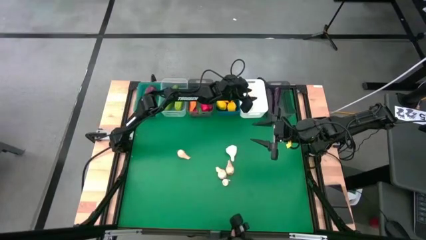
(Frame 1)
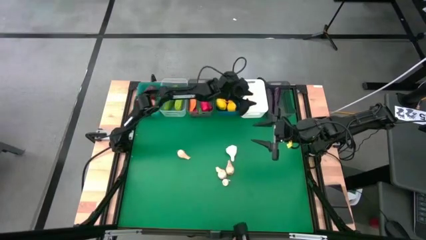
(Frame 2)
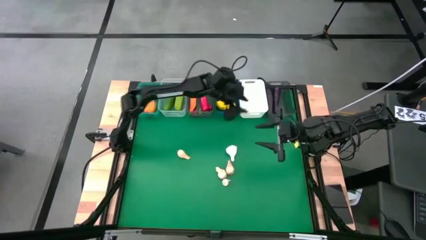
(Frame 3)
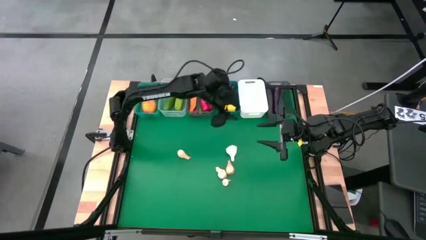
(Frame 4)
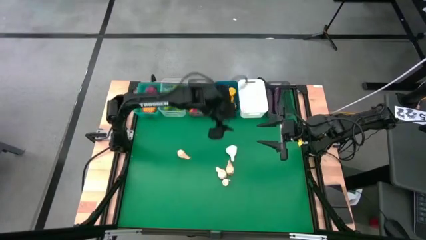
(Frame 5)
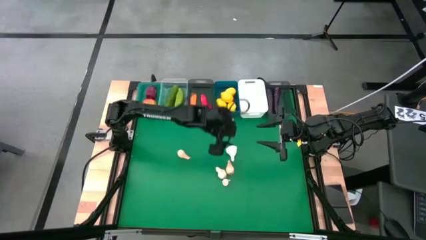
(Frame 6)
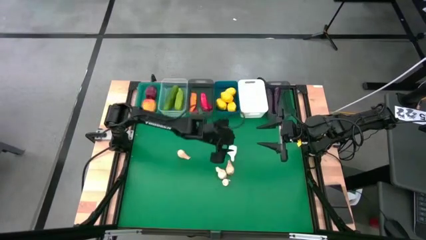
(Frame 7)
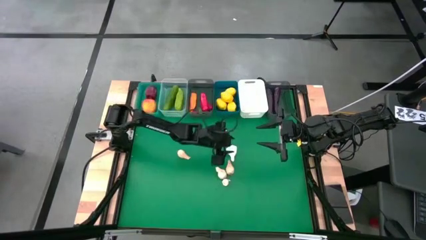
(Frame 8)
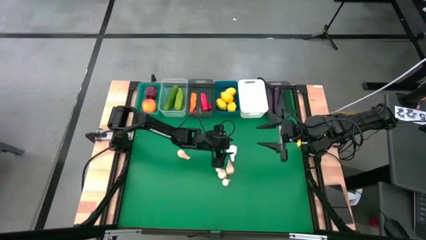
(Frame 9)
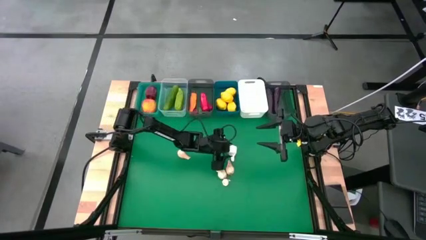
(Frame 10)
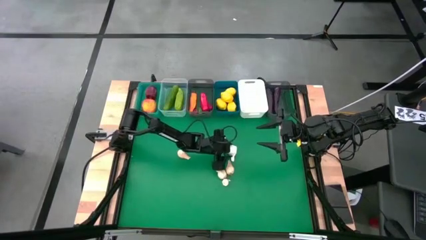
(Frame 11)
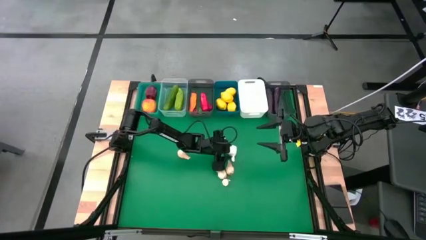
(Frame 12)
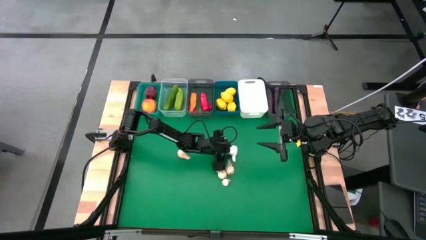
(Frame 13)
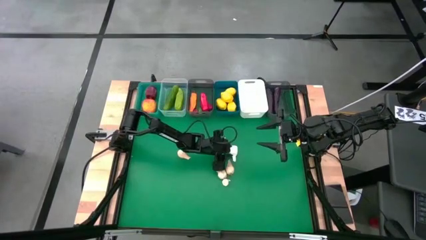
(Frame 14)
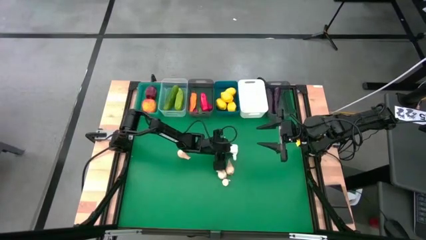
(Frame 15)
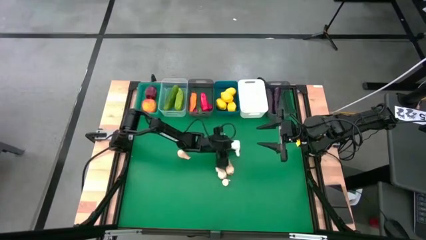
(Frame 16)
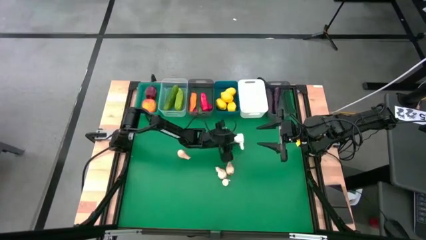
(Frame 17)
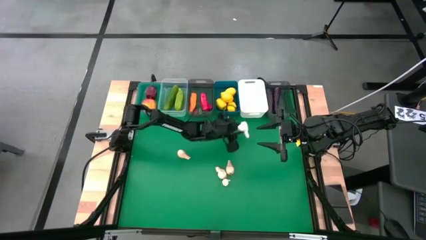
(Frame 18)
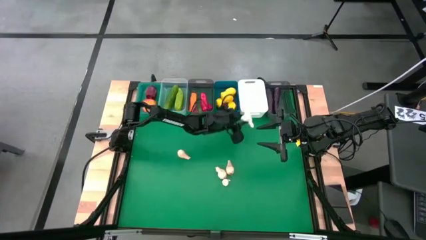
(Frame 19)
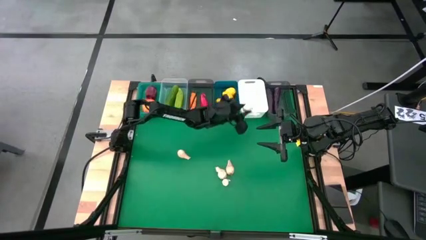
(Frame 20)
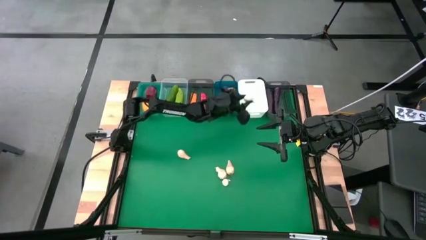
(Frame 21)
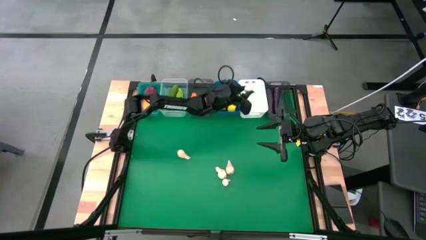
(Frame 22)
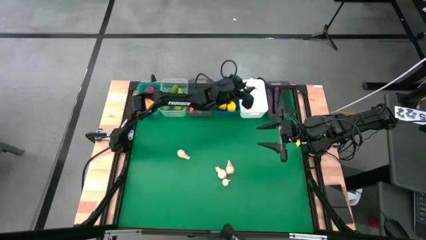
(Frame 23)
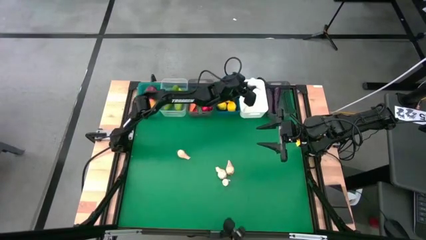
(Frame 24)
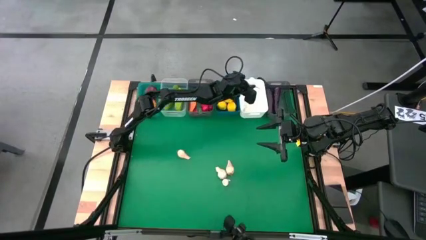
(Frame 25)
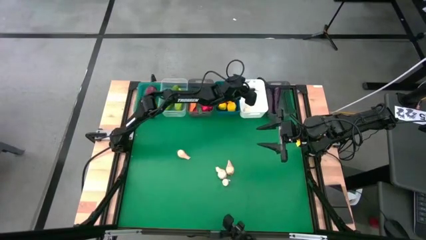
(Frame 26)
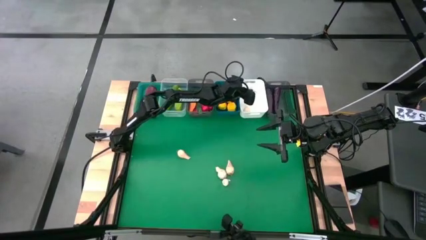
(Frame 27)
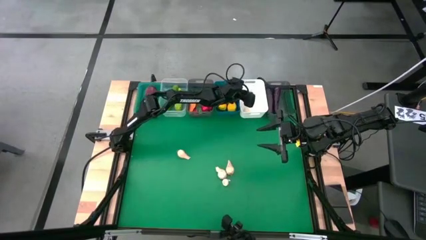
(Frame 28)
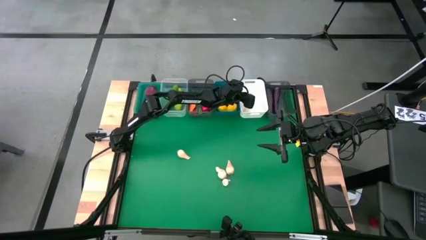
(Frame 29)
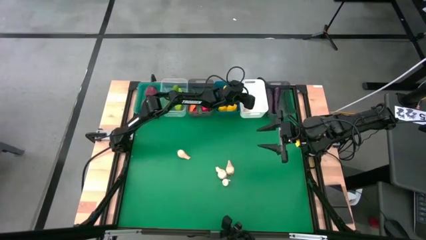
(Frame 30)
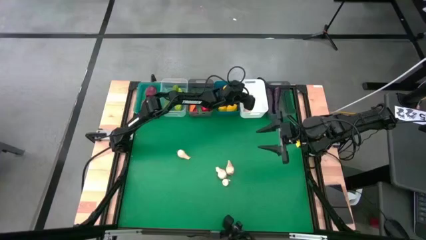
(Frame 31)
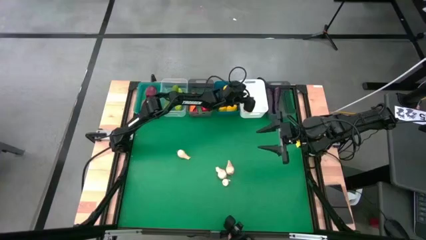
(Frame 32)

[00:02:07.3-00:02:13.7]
Task: Sort produce into baskets
Put the garlic into the white bin

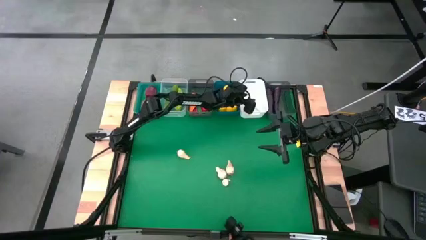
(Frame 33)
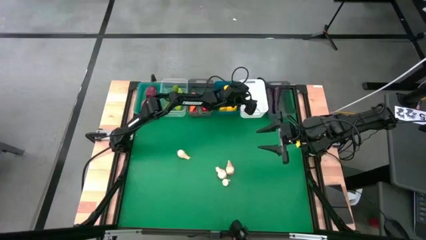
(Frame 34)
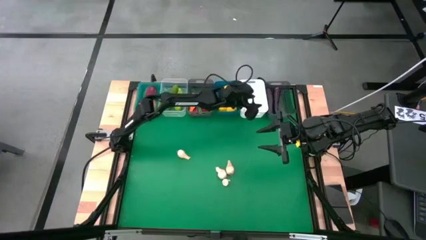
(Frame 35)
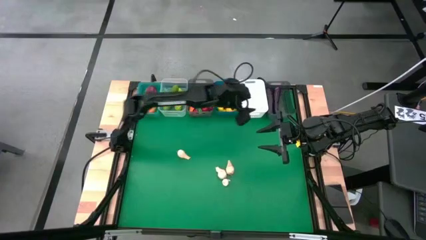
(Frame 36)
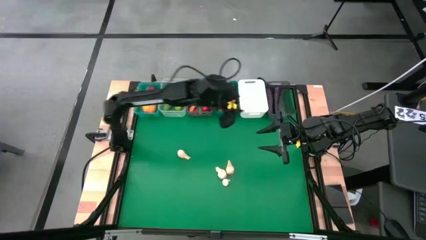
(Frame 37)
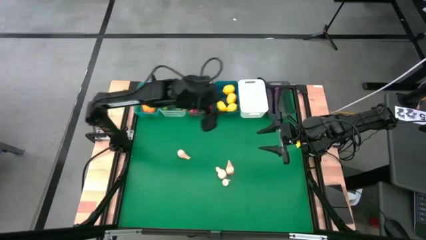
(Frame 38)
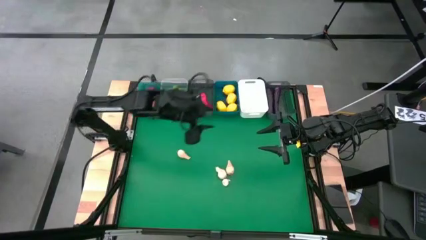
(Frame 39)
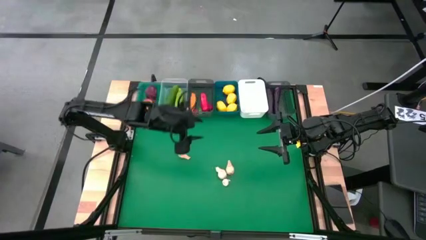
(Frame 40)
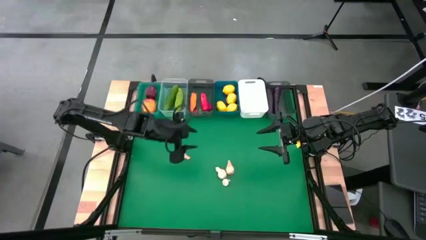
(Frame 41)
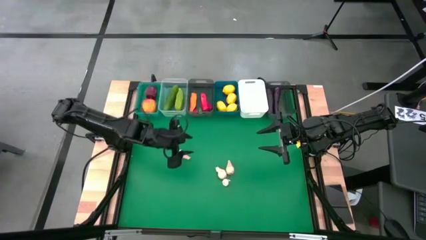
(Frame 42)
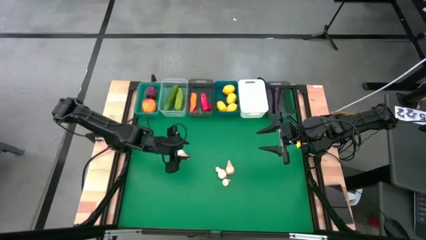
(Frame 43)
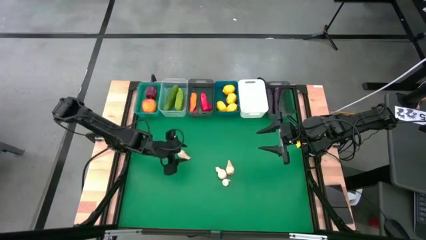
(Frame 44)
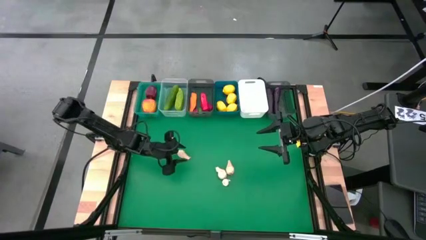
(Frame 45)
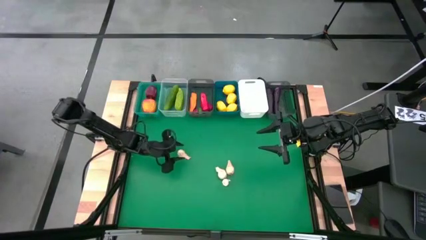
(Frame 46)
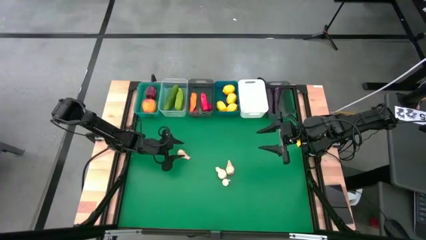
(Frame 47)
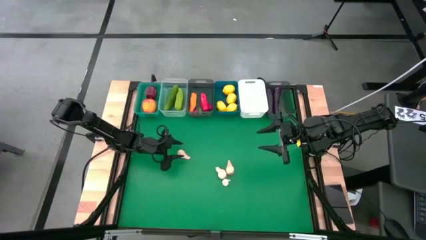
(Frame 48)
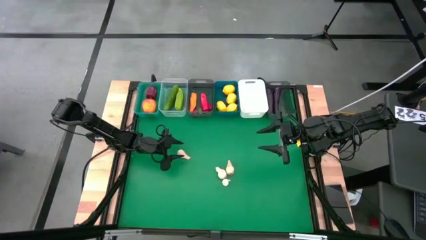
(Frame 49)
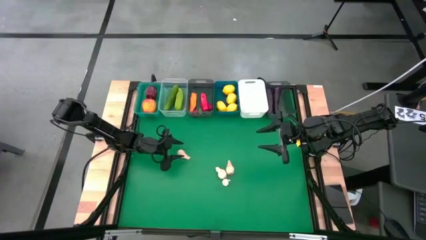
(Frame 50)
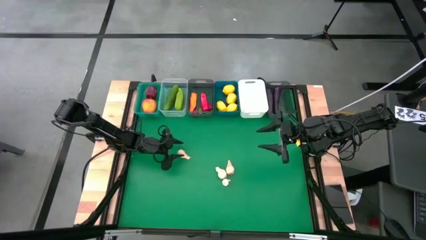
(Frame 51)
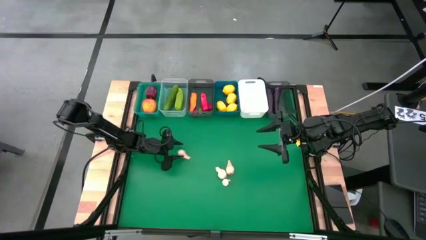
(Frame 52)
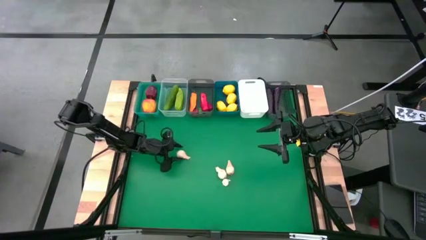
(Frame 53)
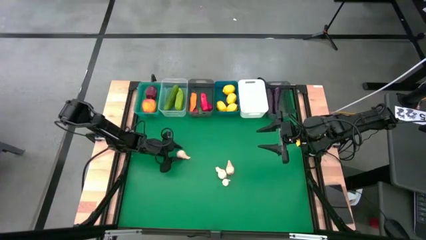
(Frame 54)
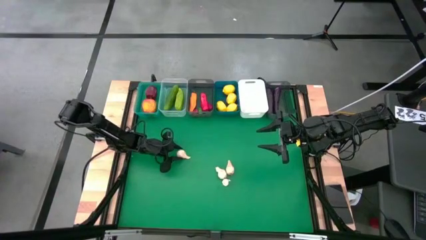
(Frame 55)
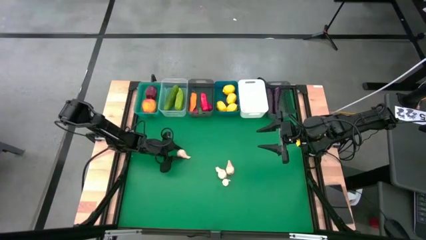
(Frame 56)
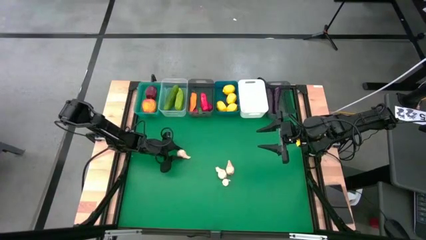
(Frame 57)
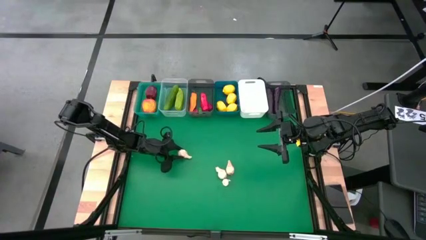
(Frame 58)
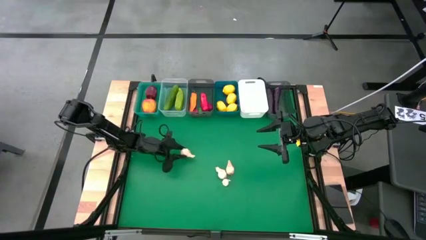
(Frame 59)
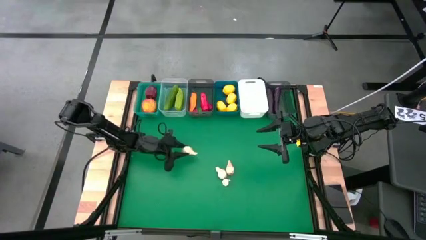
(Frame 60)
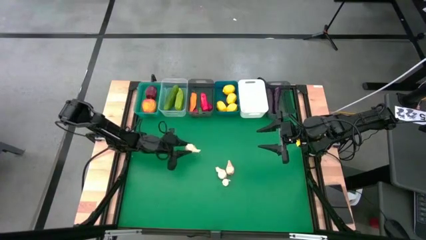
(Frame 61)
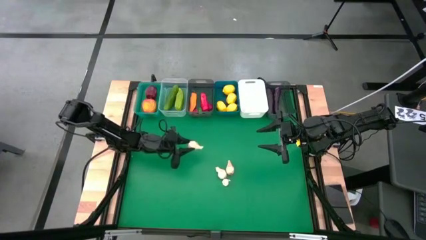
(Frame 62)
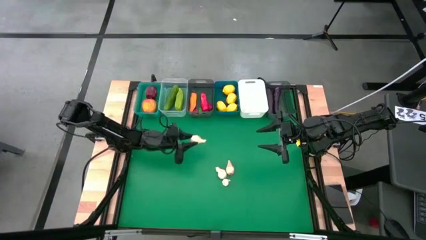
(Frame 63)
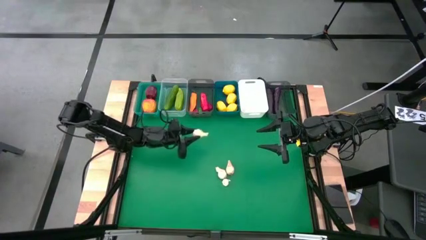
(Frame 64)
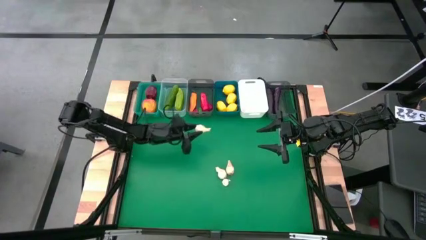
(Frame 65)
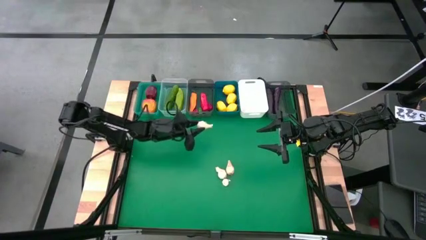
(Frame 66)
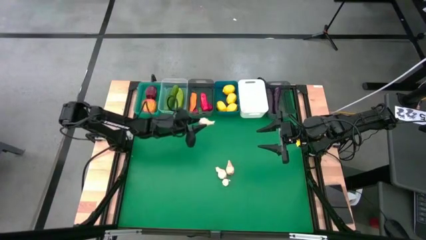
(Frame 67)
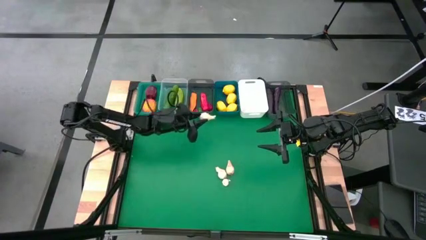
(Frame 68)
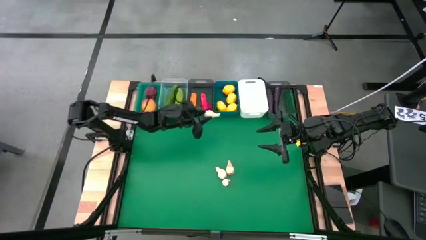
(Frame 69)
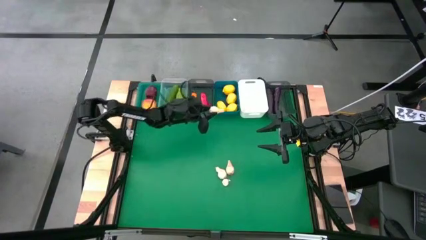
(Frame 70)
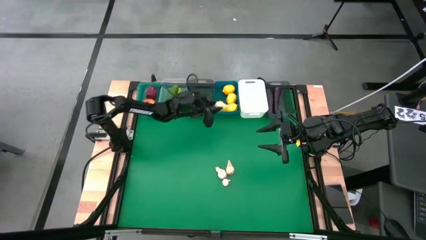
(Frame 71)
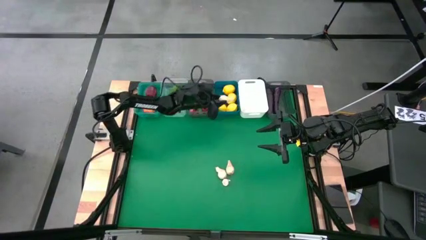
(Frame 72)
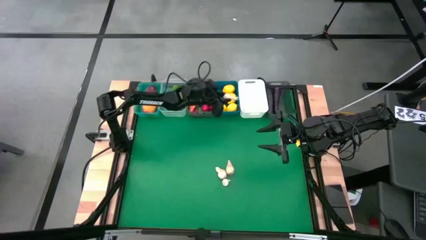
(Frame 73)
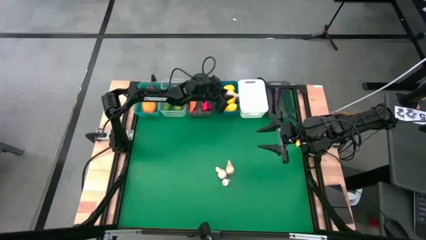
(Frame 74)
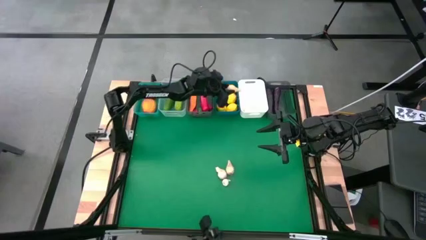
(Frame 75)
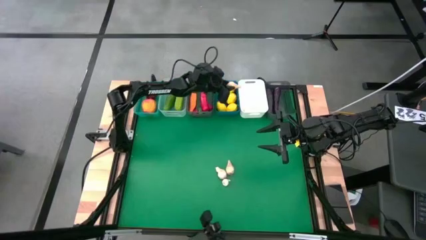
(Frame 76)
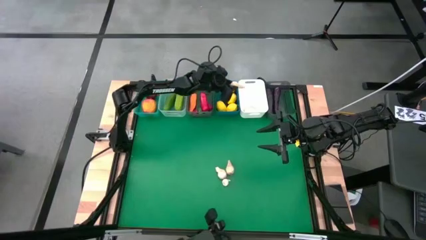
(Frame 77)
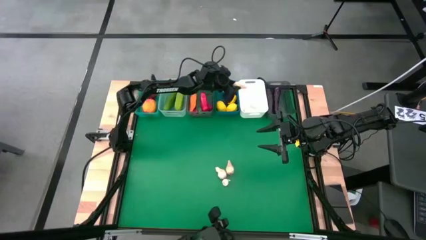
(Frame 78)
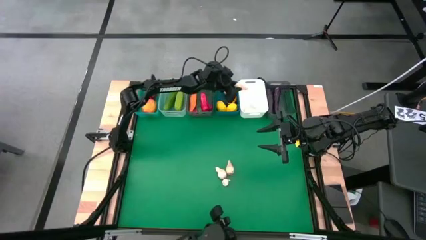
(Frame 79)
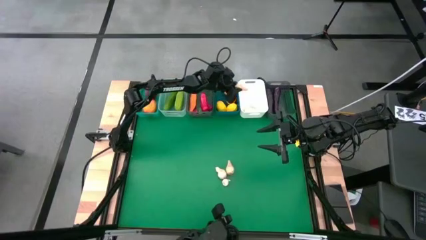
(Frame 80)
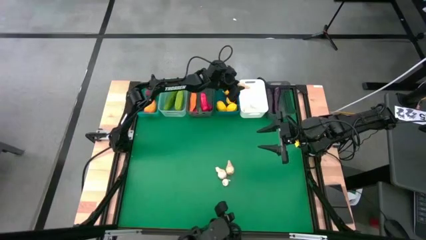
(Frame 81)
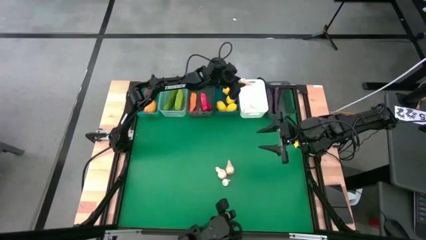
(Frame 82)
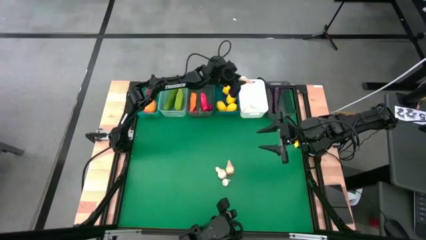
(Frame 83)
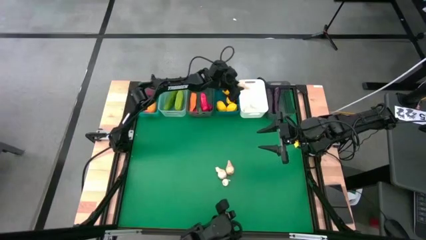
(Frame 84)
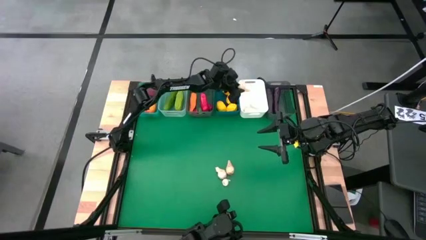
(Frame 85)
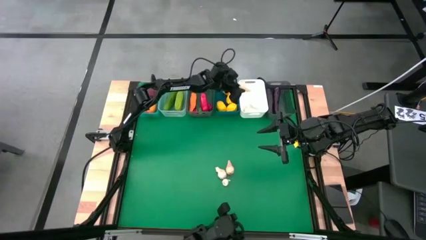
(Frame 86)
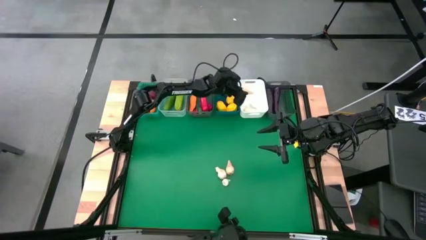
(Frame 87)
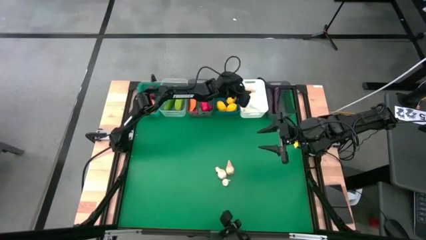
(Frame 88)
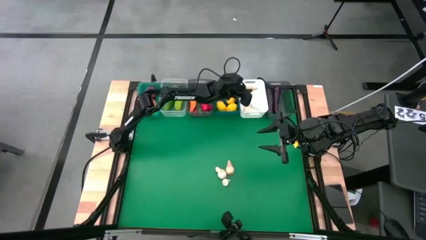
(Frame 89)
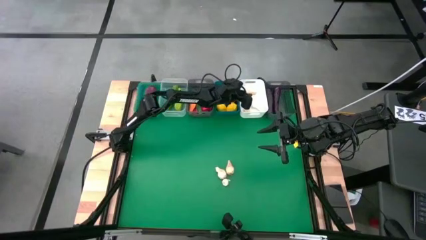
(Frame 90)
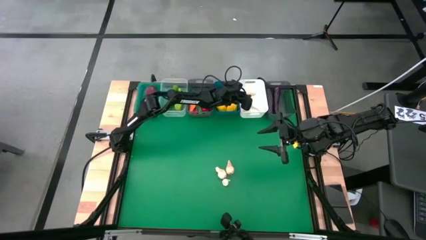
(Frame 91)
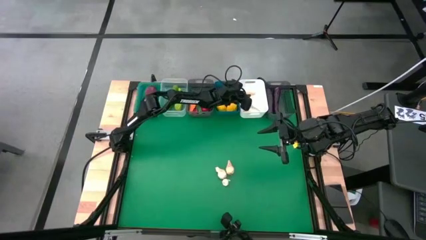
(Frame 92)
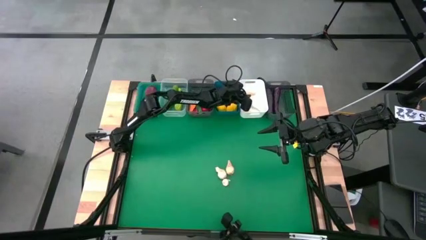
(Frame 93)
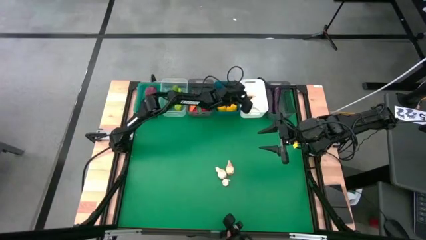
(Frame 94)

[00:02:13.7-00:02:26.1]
Put the garlic into the white bin
